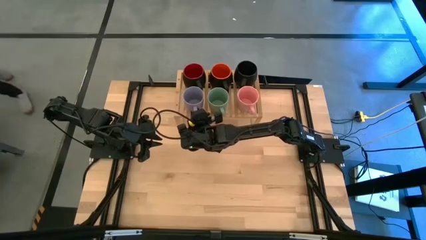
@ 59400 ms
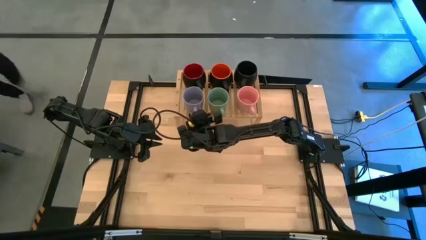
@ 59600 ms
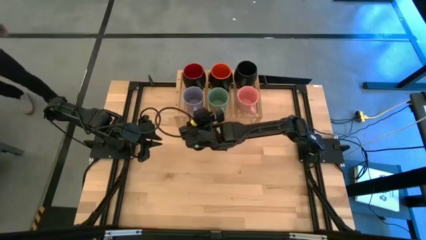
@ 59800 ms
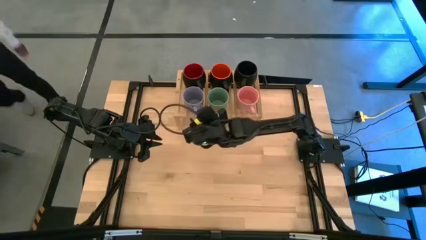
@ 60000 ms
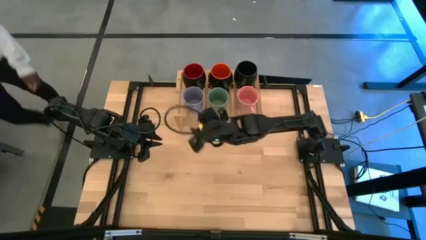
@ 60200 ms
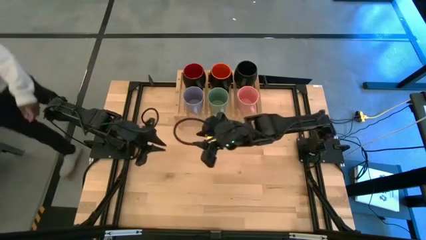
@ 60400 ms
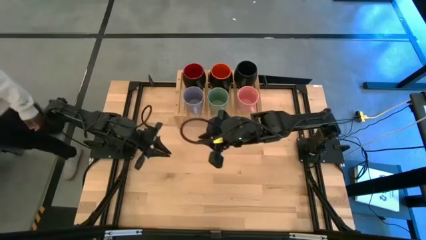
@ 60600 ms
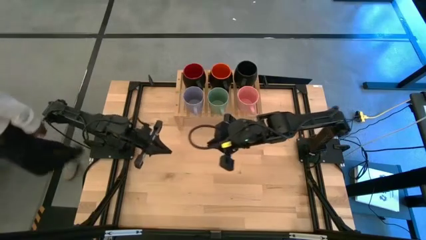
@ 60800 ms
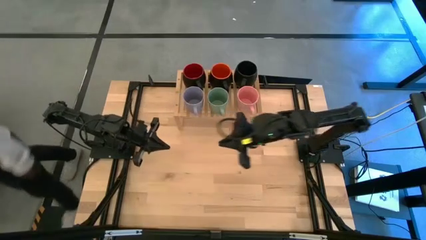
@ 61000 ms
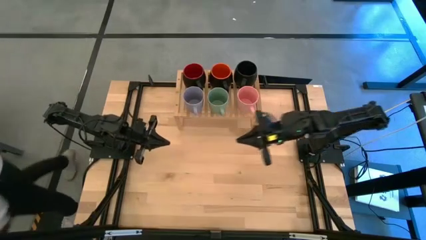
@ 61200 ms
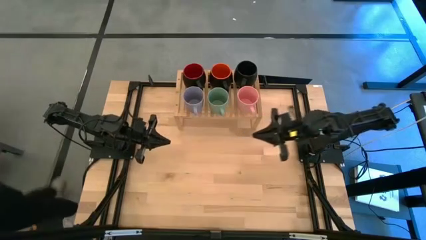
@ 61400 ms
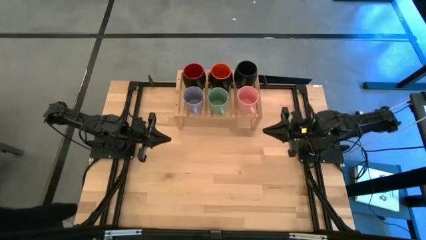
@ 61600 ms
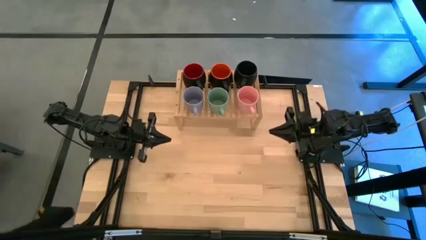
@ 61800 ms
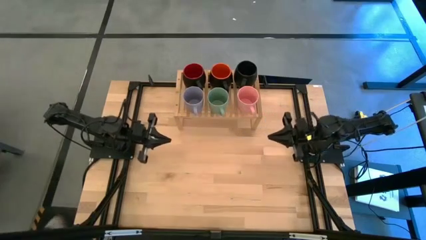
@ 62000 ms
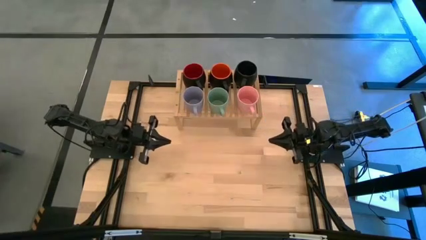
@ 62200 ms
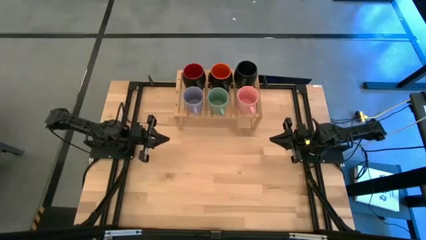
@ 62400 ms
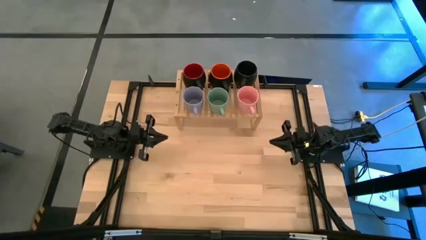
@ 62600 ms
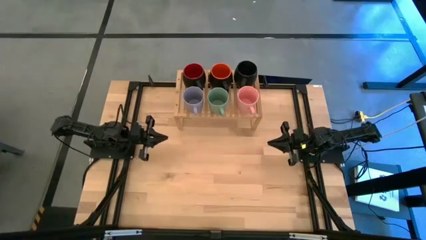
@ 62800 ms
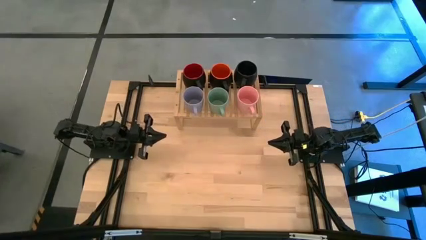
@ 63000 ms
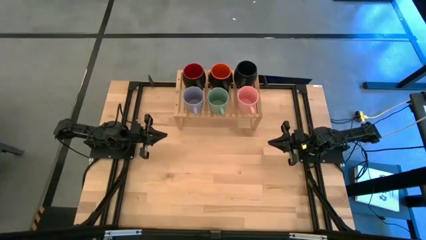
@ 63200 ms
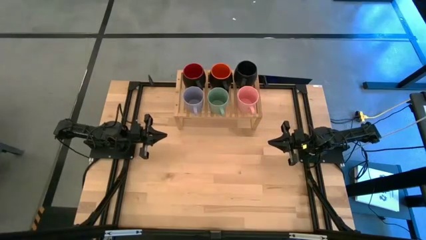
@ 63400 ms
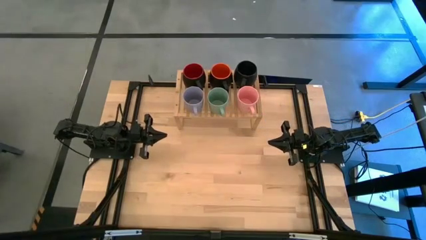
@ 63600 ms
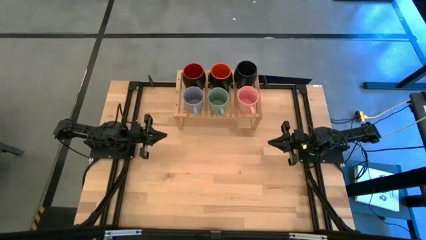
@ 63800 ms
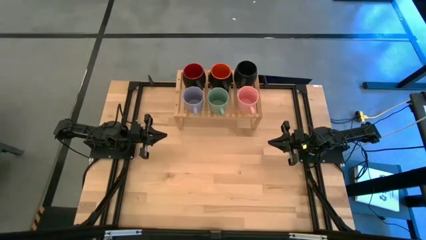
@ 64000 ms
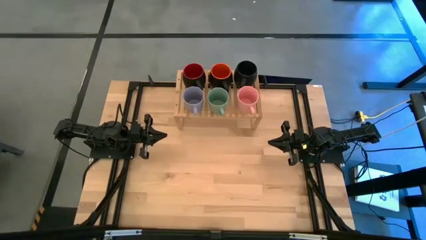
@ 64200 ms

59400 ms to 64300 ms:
Task: Place coffee mugs
Return to Home Position

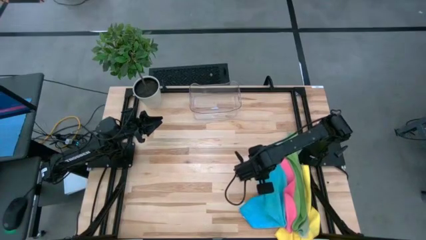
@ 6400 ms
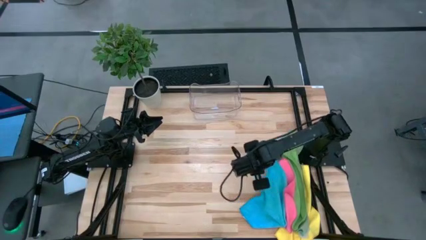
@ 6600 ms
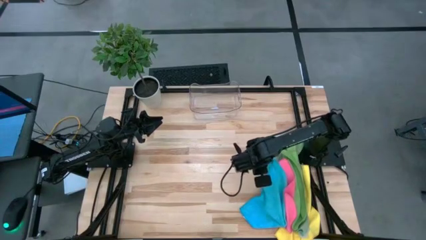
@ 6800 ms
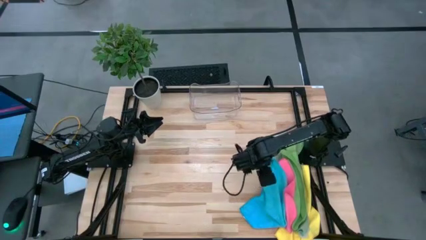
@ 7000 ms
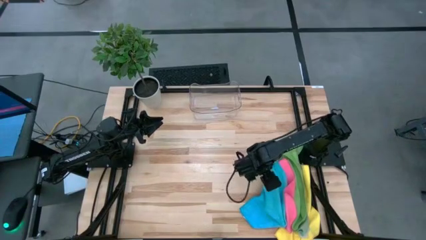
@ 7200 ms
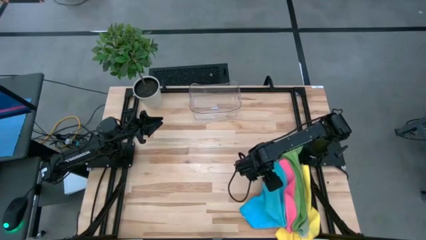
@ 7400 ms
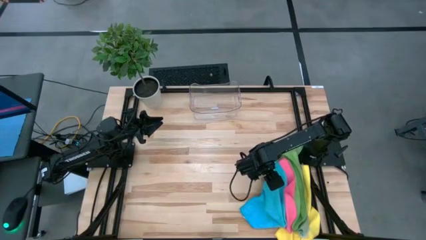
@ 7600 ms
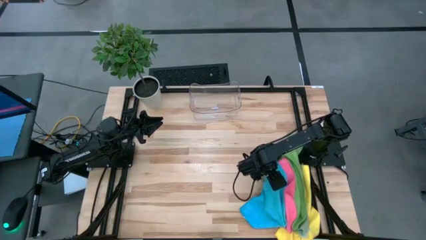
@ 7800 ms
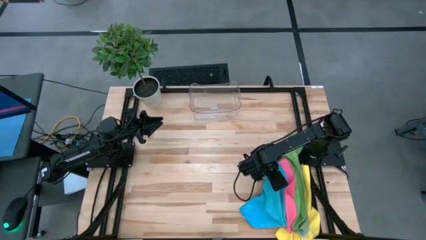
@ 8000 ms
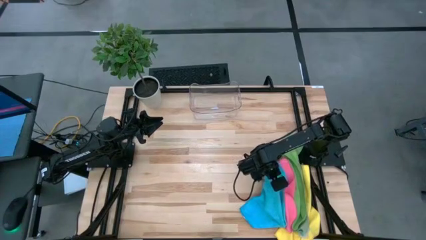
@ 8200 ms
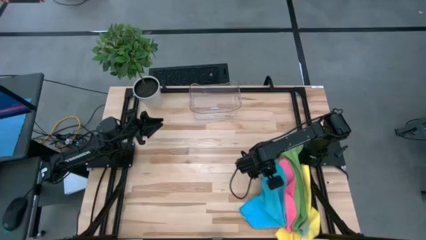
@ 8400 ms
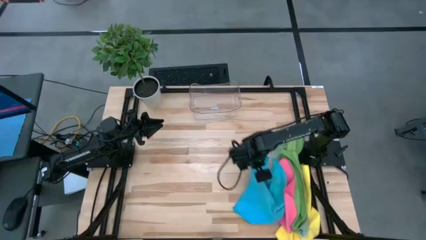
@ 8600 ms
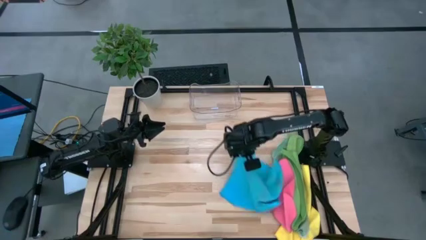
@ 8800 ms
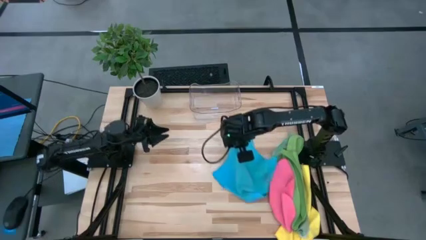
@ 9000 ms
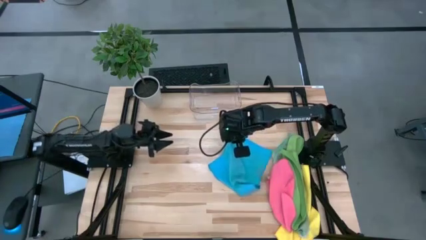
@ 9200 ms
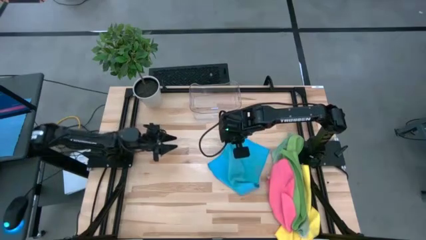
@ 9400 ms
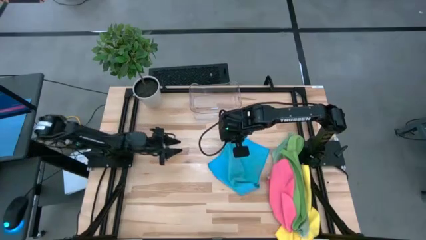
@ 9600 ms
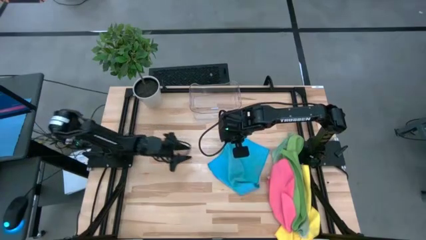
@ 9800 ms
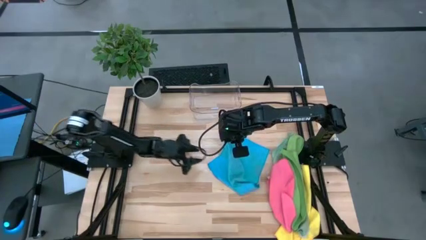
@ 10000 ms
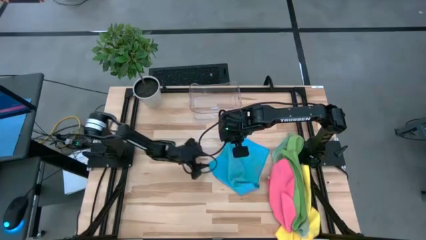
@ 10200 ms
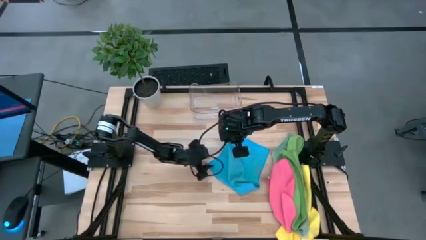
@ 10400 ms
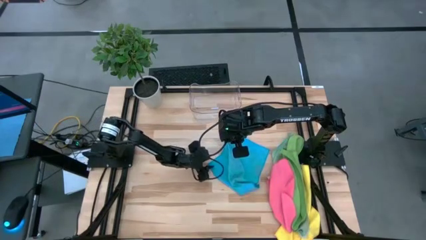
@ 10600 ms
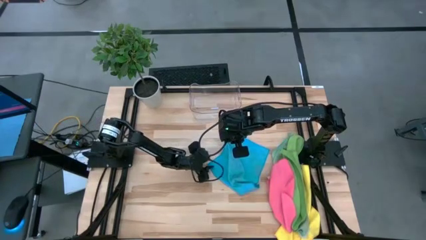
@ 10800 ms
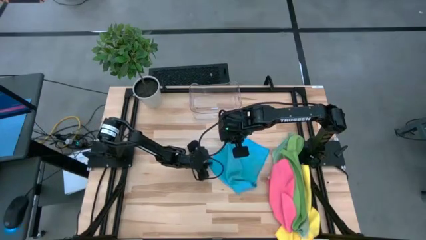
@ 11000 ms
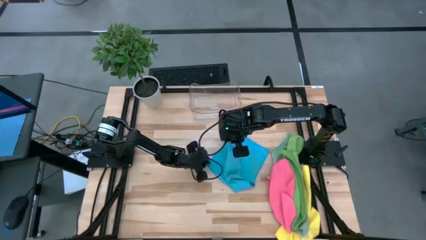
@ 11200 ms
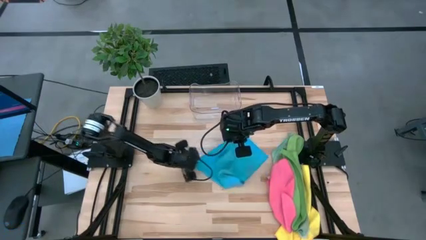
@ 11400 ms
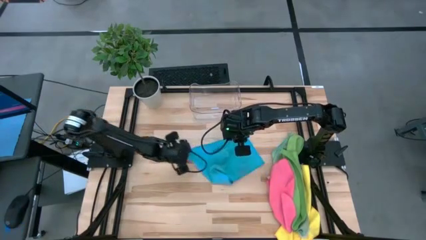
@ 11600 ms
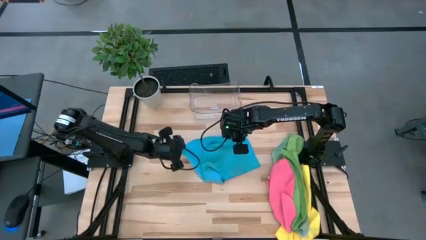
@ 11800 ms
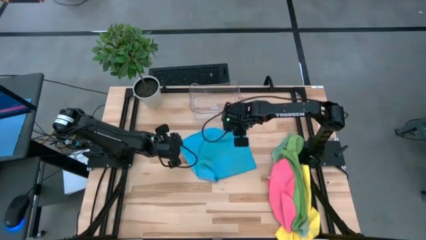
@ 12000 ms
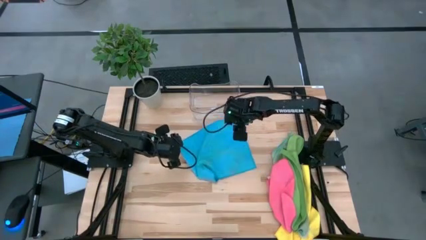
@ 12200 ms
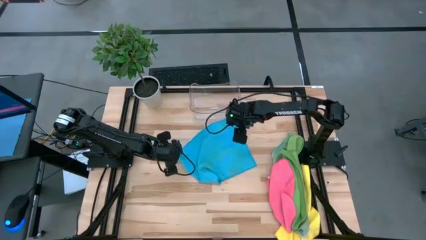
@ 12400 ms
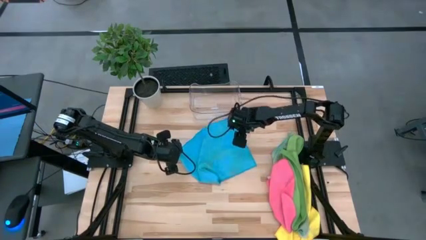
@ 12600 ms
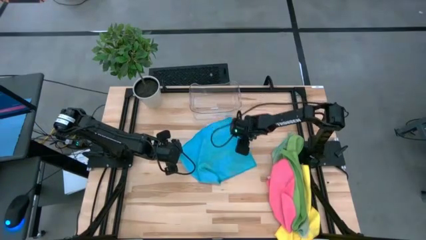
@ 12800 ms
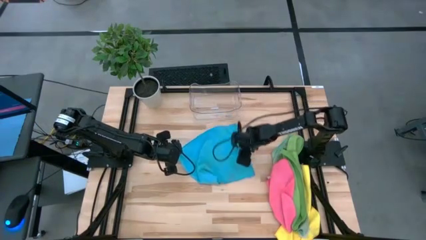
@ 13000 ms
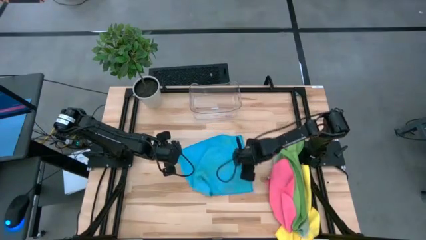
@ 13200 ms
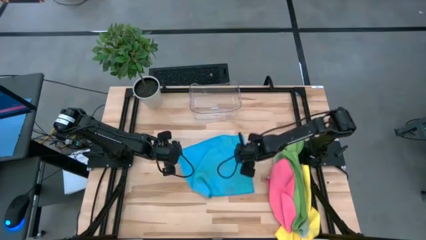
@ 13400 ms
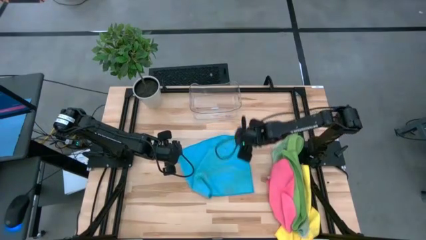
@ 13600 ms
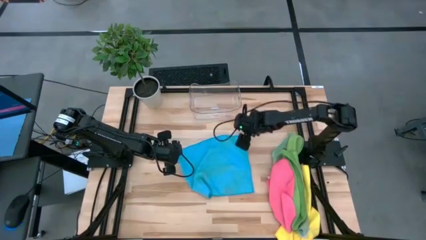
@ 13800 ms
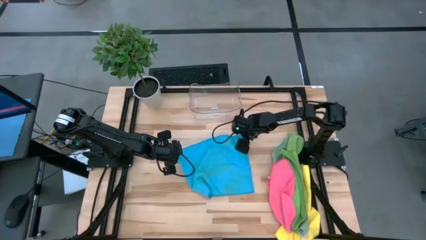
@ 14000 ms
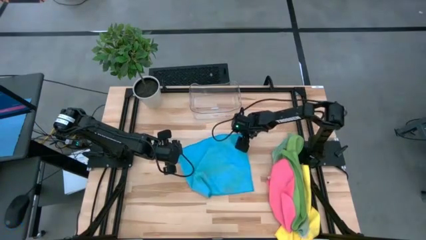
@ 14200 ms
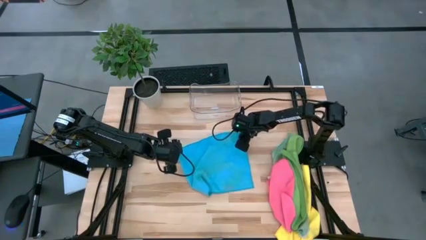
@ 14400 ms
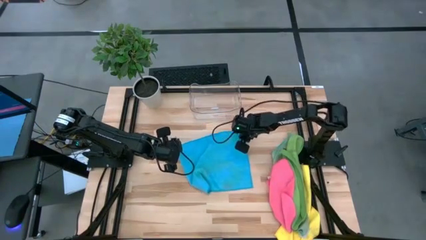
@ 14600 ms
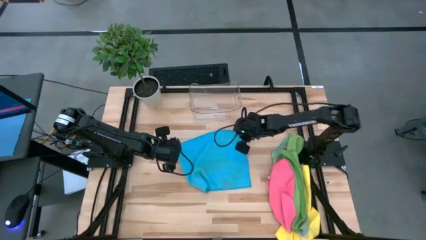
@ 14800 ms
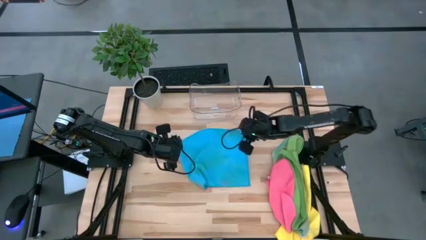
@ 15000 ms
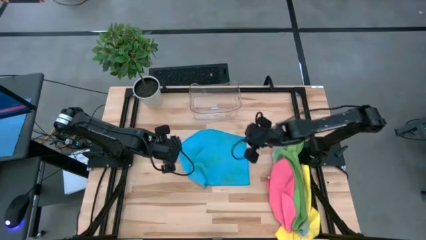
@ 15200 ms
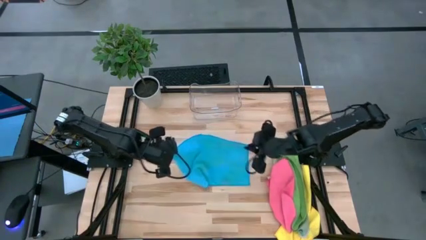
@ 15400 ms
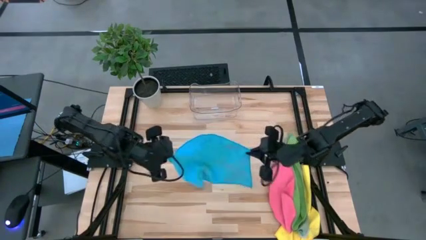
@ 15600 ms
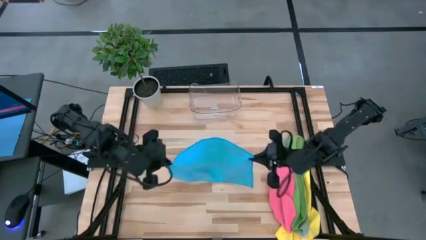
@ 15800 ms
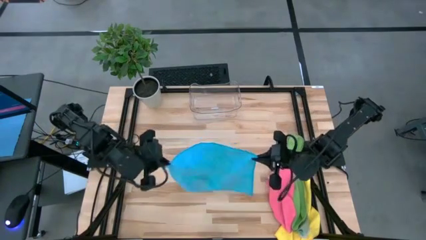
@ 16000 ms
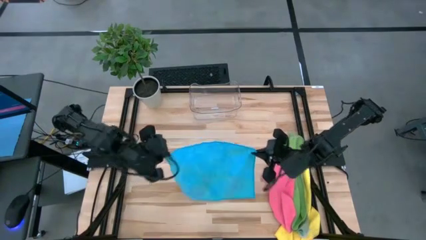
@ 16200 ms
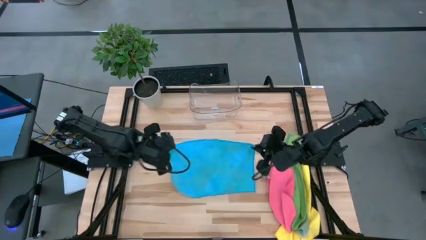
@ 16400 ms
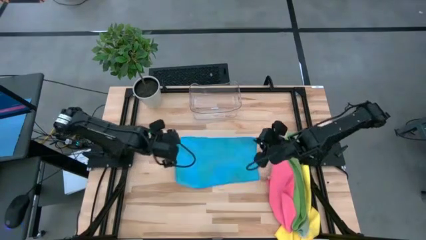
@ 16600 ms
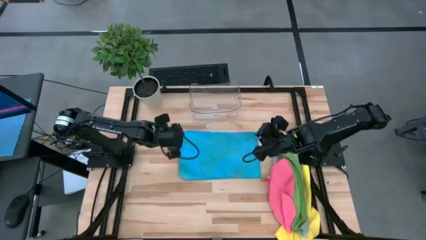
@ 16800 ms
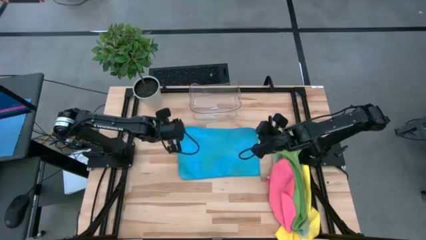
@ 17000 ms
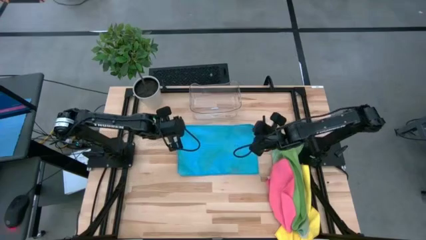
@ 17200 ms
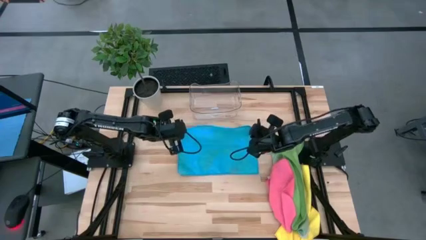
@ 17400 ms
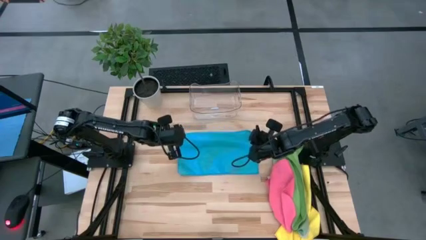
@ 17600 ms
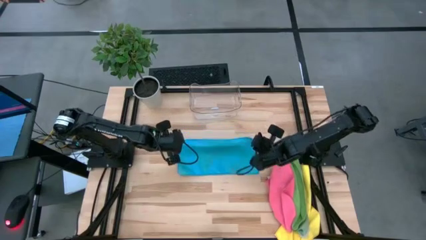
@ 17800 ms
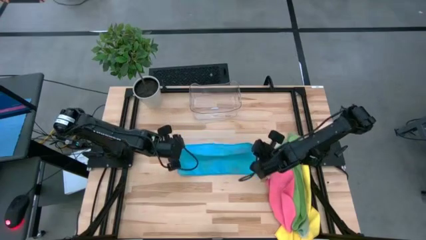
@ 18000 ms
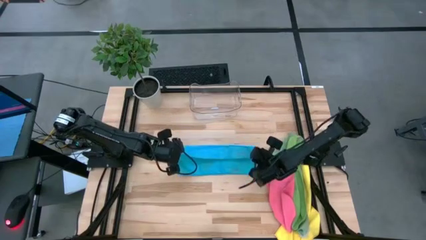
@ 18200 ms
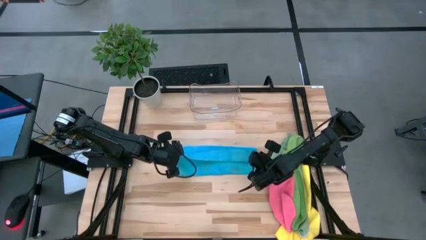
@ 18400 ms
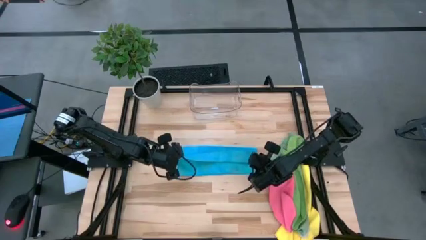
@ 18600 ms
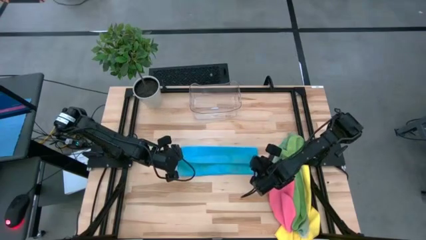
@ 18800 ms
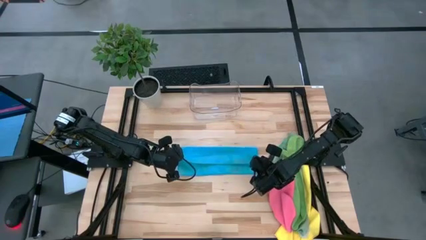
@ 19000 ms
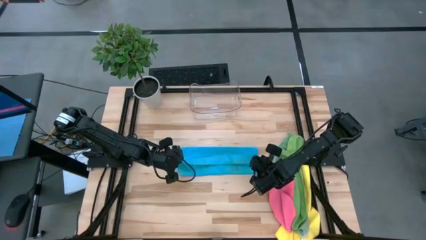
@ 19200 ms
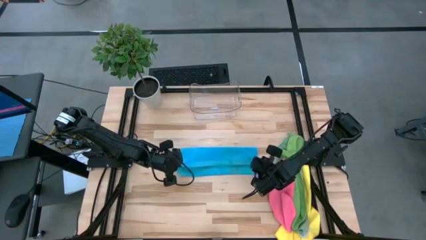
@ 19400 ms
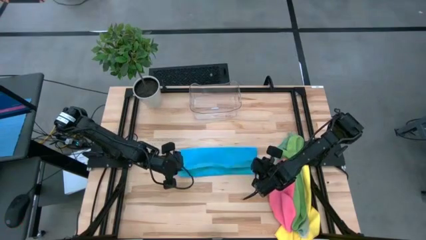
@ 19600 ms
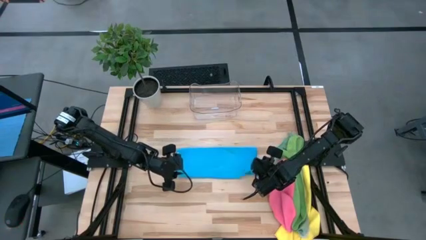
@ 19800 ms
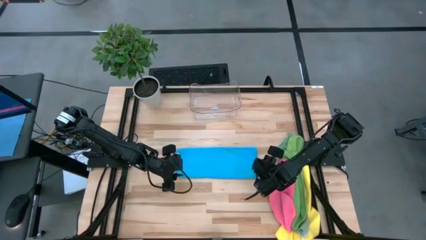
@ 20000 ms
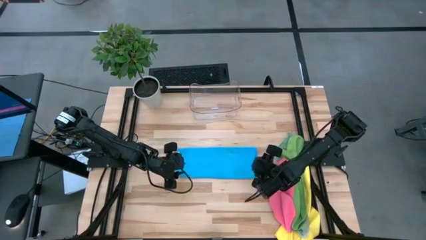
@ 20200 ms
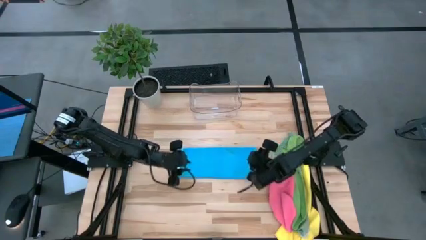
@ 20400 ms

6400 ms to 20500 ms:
Task: Fold microfiber towels
Fold the blue microfiber towel
